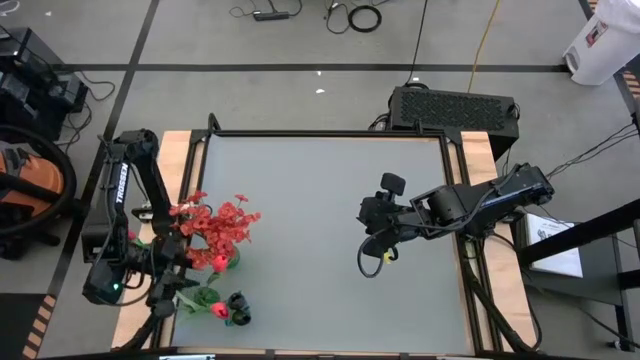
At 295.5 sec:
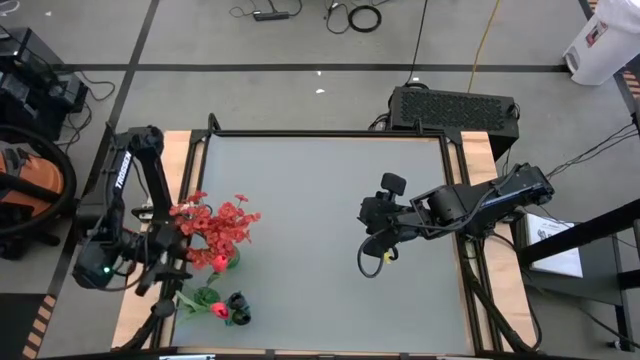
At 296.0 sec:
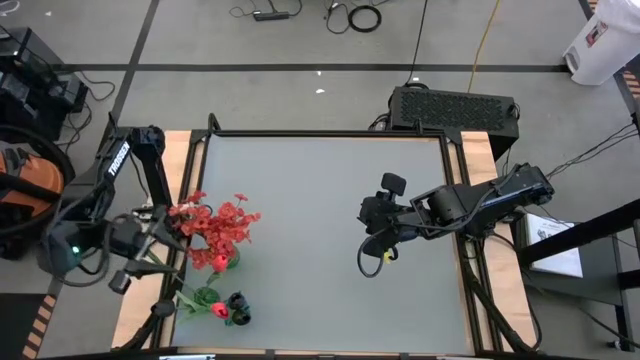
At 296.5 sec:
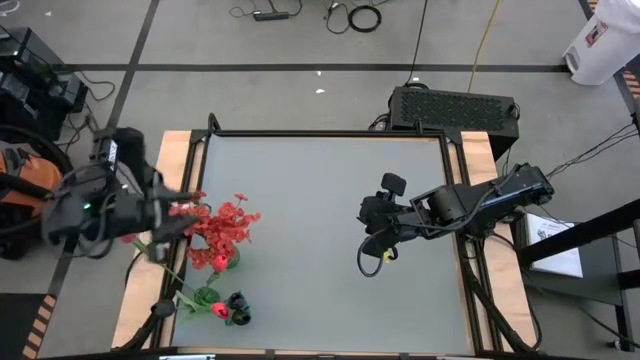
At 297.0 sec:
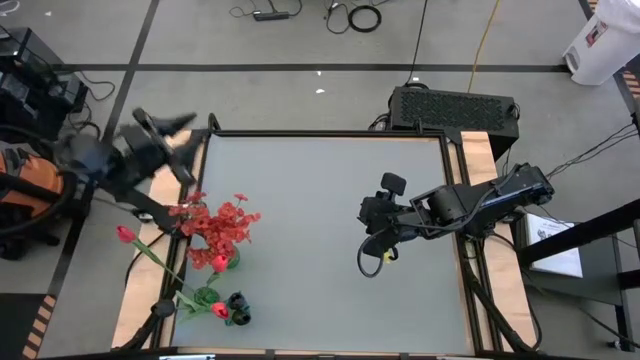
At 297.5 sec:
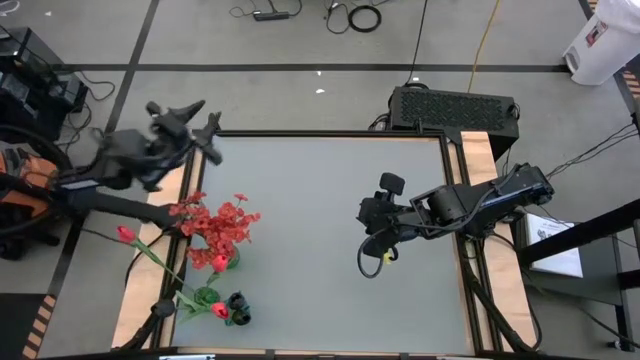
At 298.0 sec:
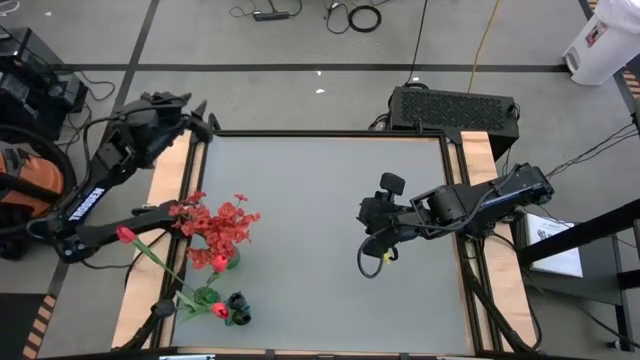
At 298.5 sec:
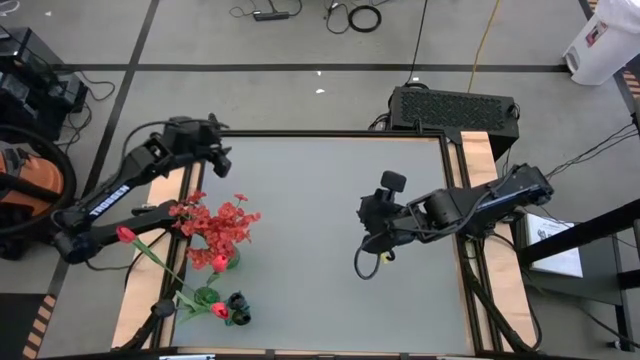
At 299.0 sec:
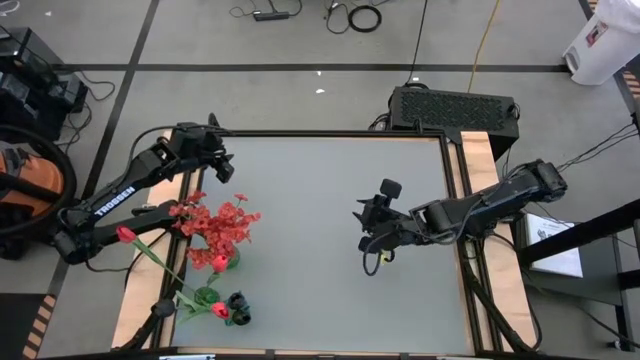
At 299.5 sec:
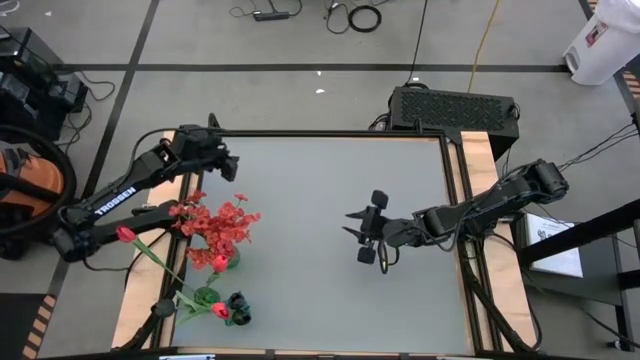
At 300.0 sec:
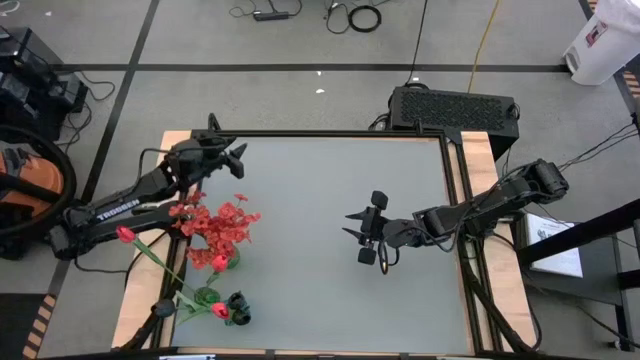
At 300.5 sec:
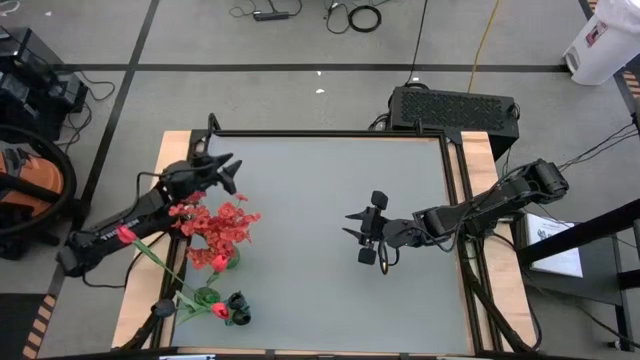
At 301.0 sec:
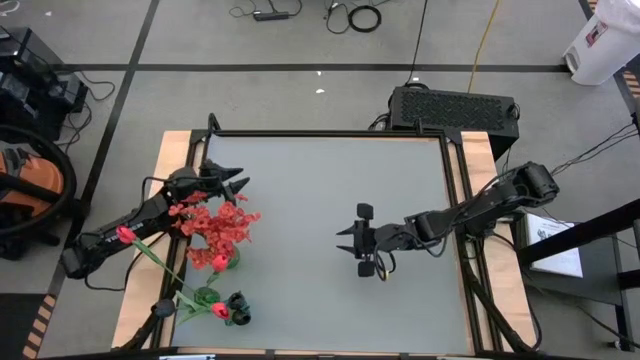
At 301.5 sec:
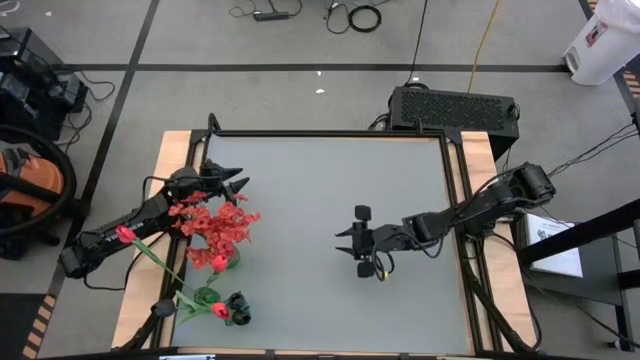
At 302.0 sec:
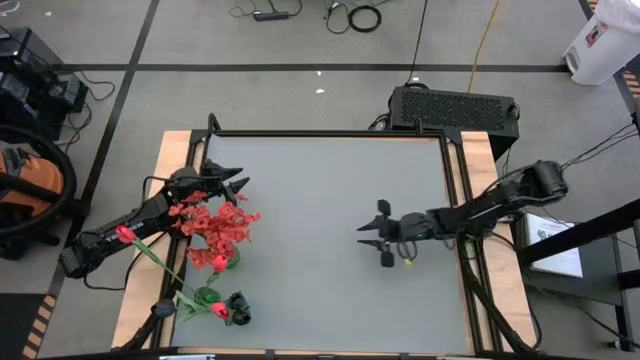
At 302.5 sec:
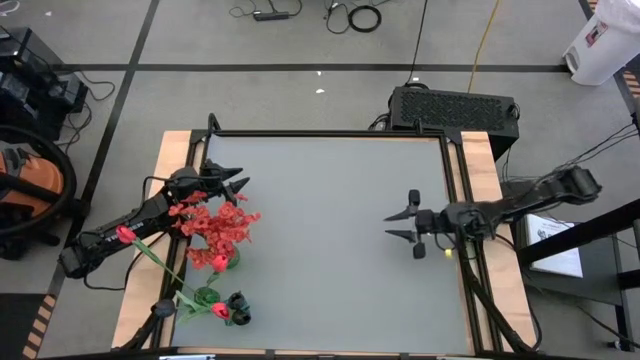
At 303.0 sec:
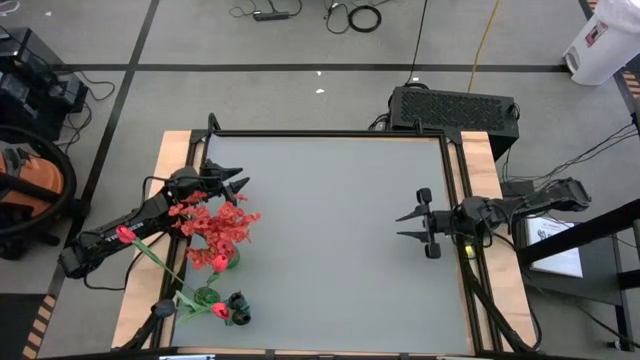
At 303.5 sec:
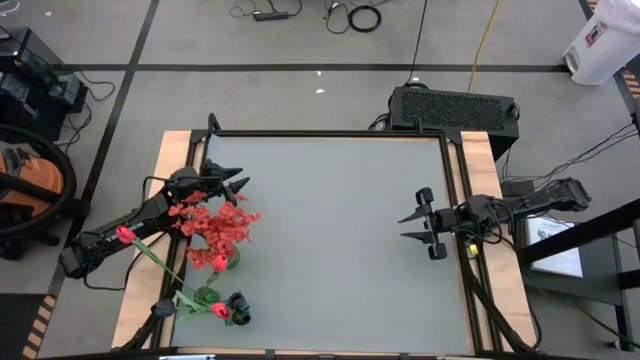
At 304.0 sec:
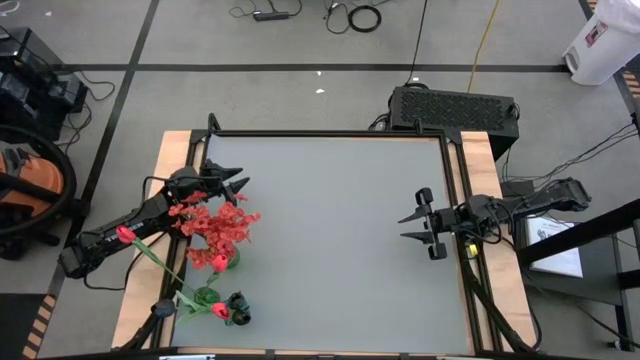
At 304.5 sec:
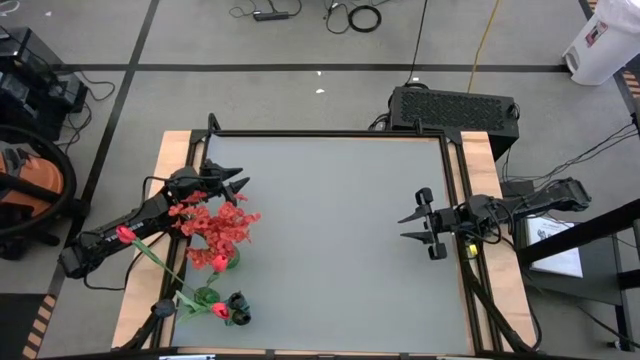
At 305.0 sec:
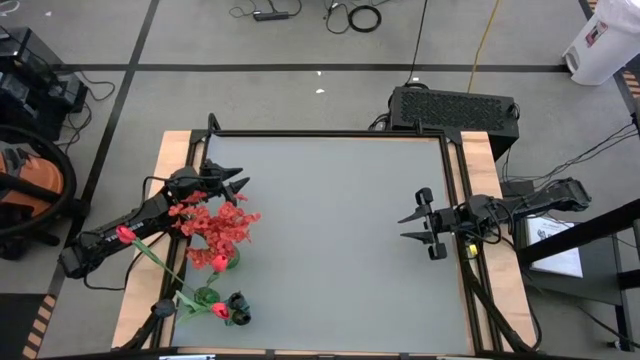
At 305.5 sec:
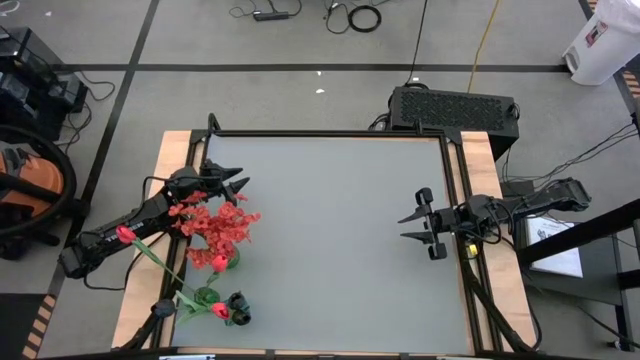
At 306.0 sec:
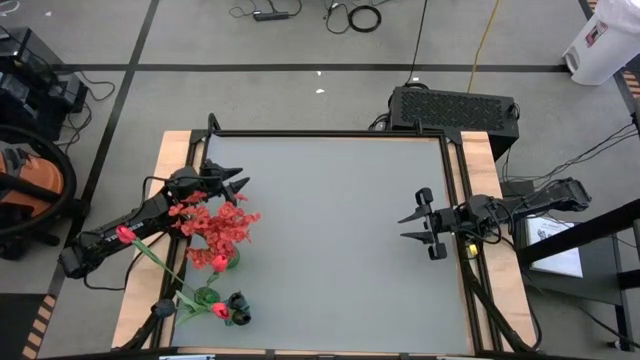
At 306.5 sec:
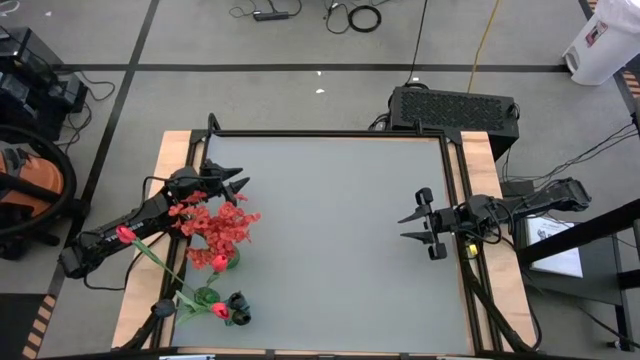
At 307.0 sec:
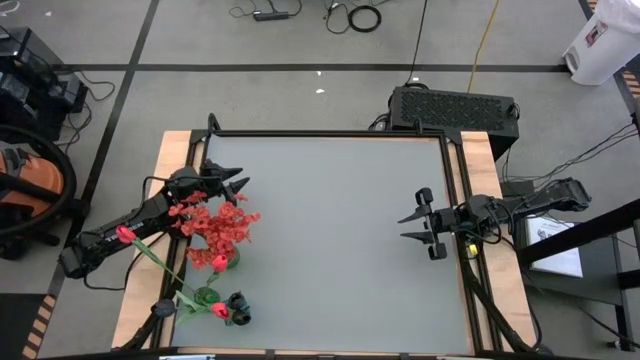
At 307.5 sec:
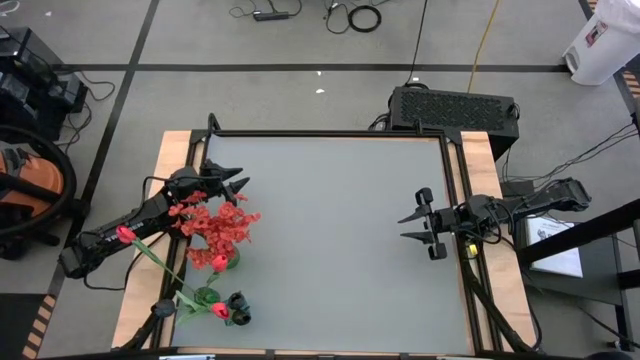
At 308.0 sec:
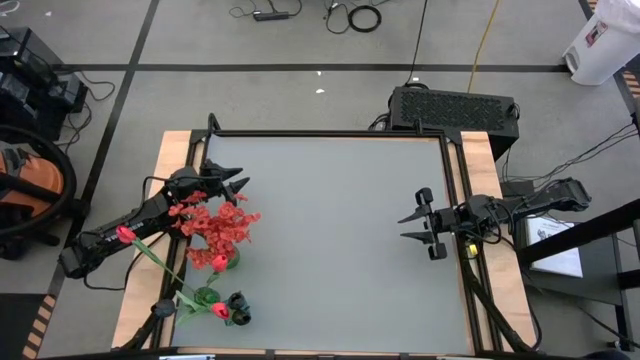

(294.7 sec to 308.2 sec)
Task: Sort flowers into vase by color
Return to Home Position

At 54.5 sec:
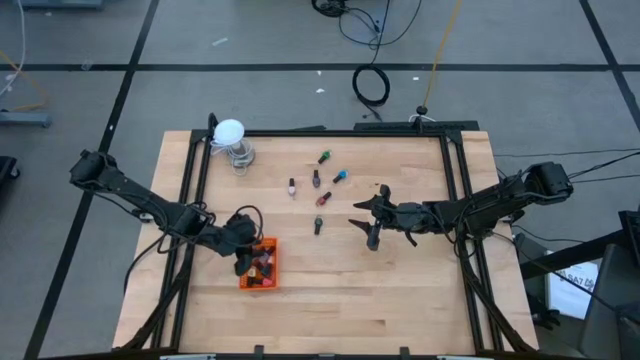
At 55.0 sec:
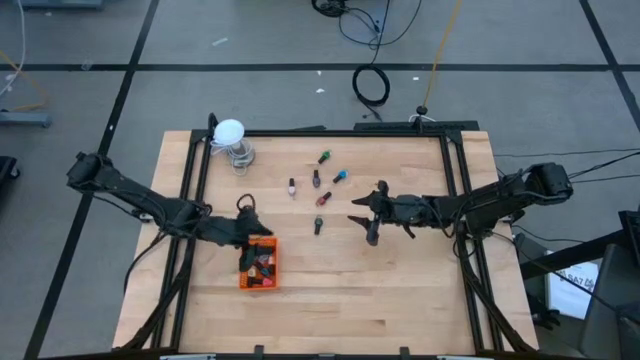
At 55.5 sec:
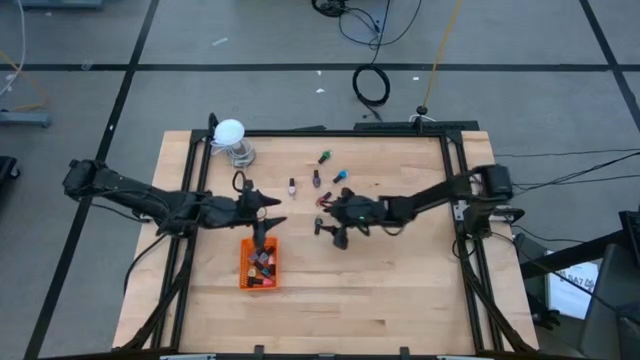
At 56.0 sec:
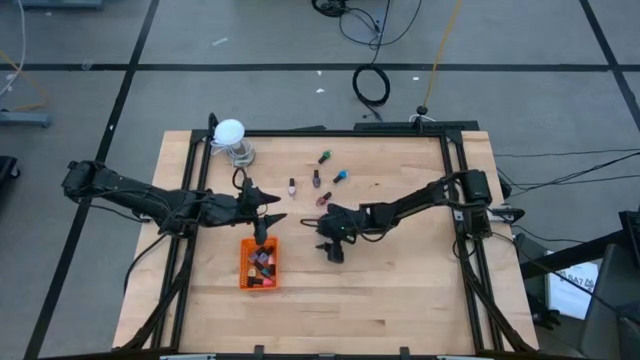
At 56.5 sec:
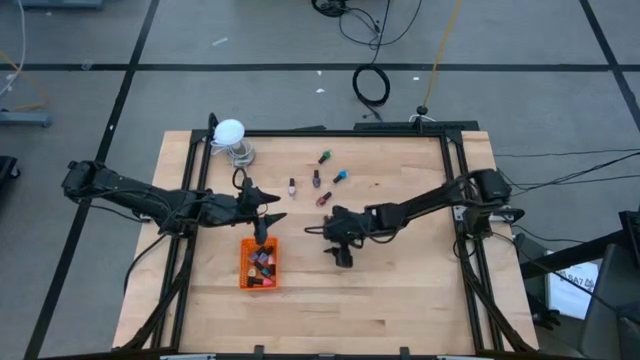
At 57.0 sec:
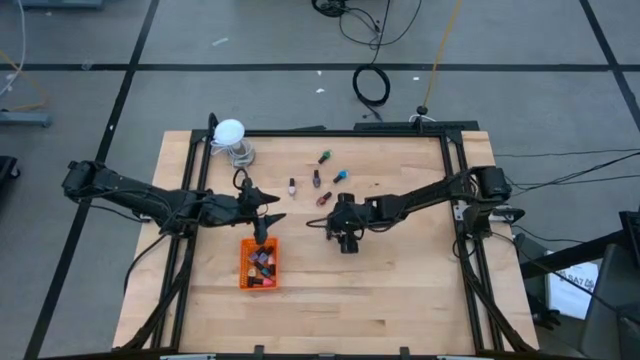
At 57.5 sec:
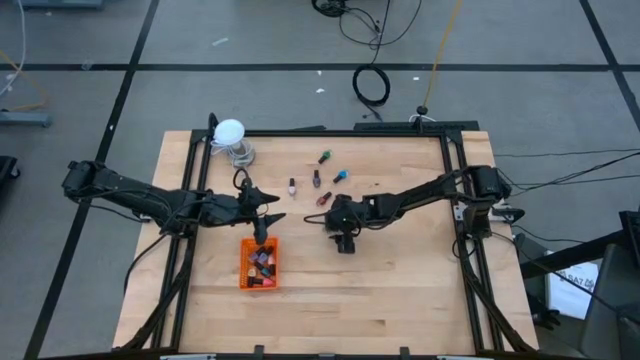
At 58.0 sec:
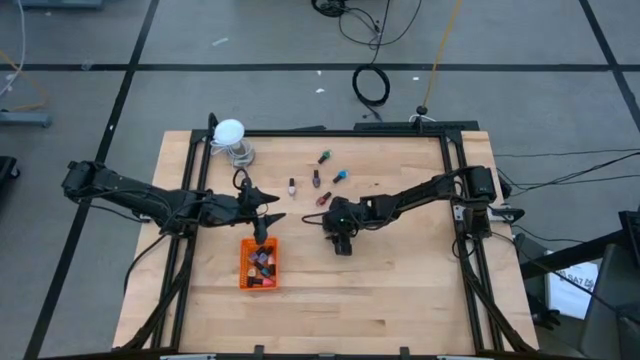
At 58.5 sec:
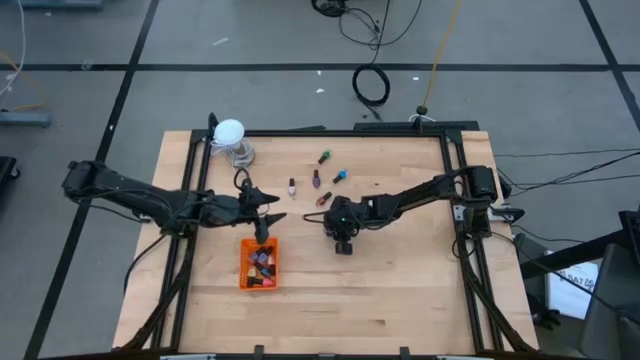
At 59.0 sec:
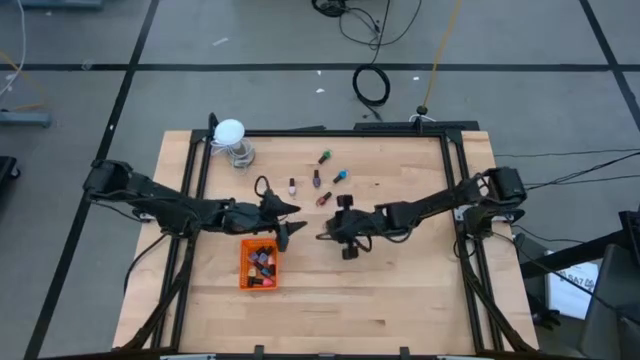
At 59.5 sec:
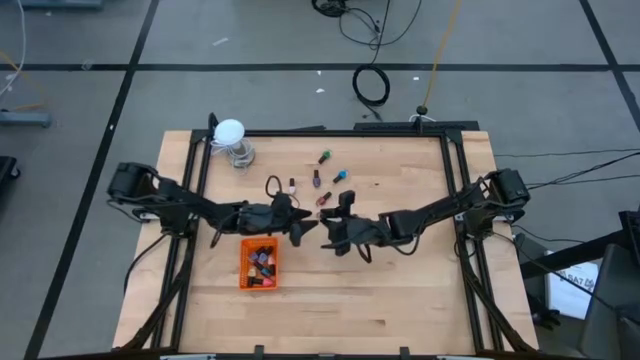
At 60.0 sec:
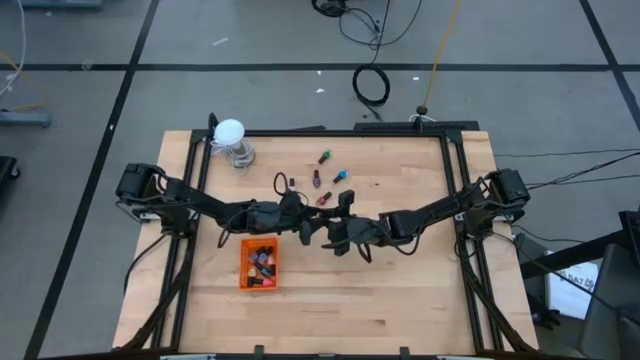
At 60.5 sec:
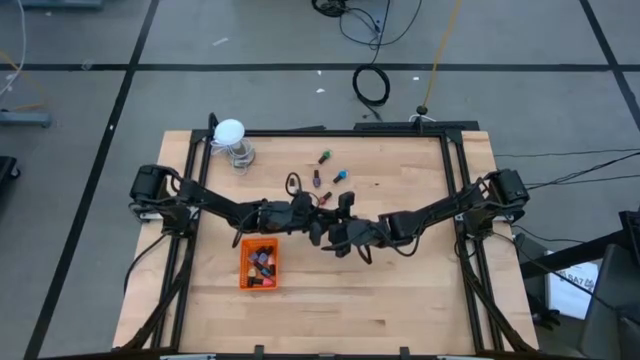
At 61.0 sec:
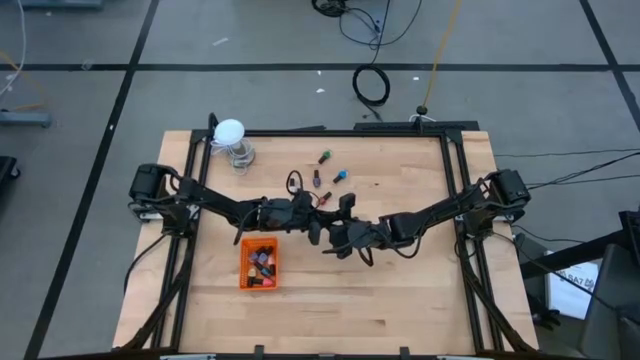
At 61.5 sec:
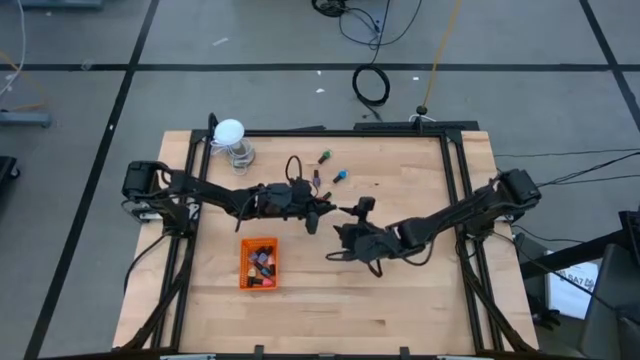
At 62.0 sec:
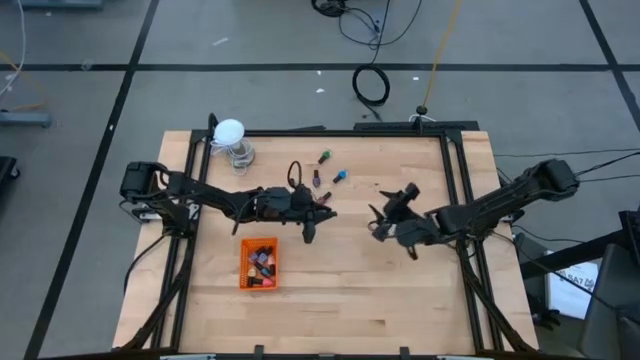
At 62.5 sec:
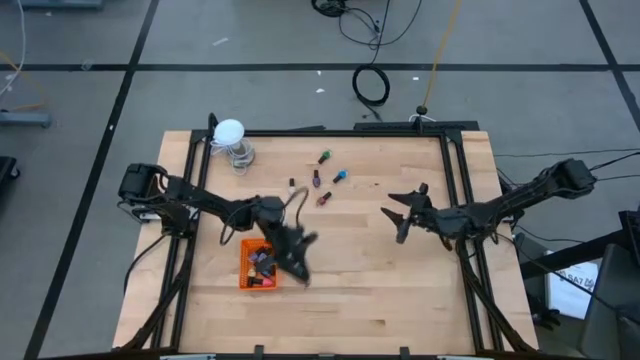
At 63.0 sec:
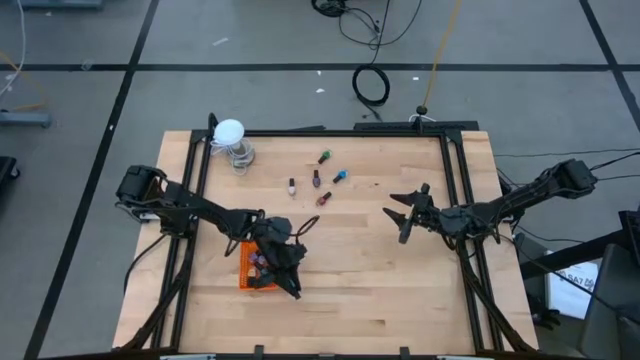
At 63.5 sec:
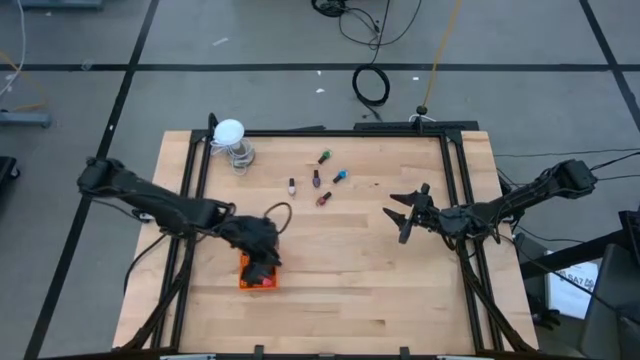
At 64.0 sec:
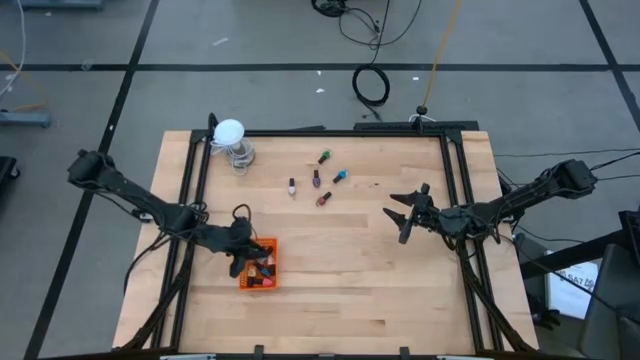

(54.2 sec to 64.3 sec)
Task: Pick & Place Nail Polish
Put the dark green nail color bottle into the orange bin
